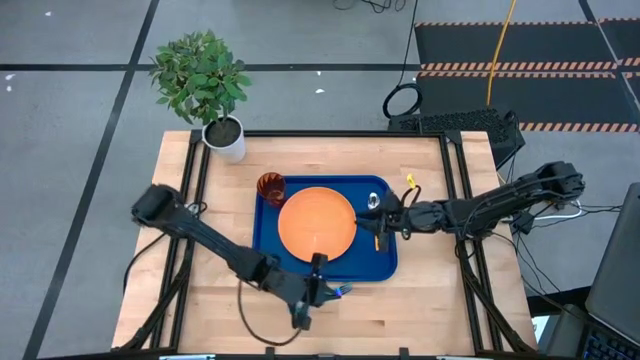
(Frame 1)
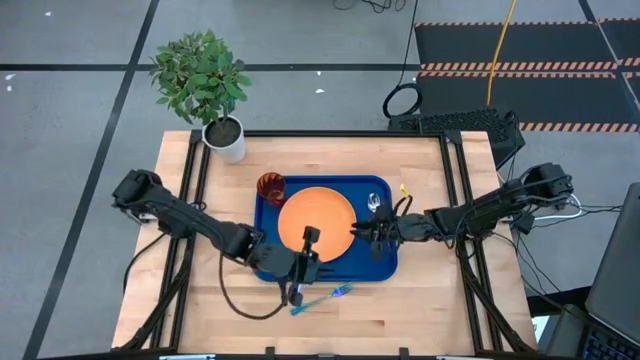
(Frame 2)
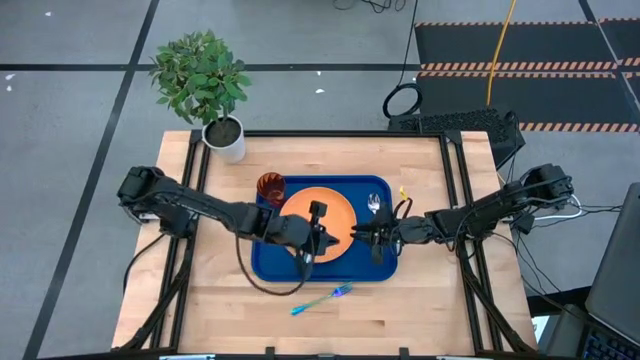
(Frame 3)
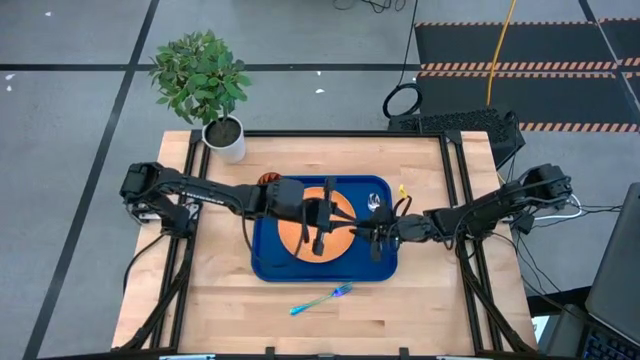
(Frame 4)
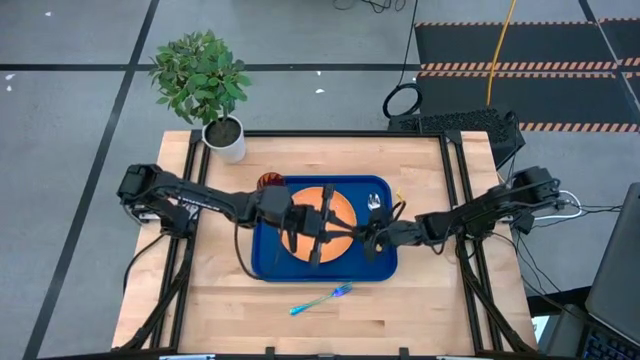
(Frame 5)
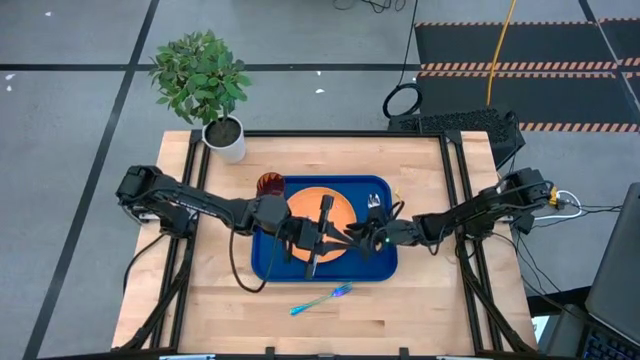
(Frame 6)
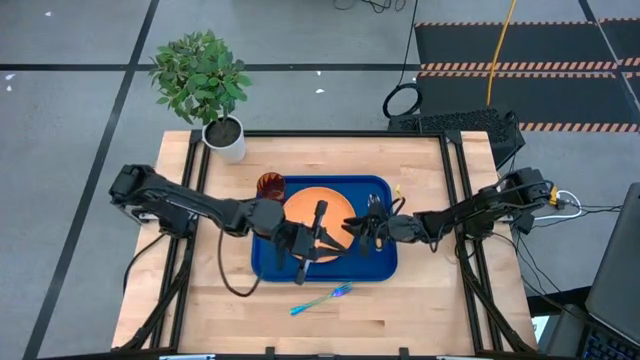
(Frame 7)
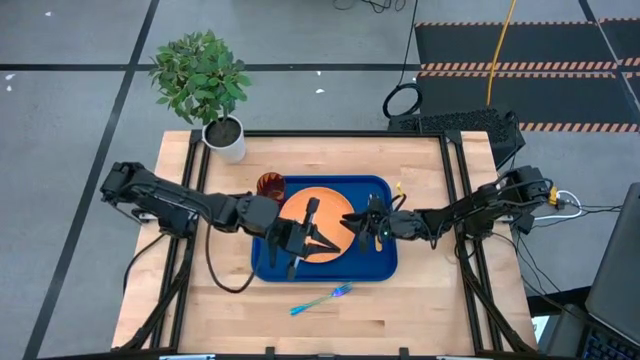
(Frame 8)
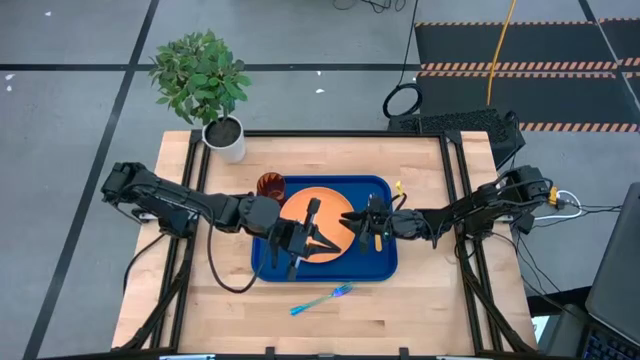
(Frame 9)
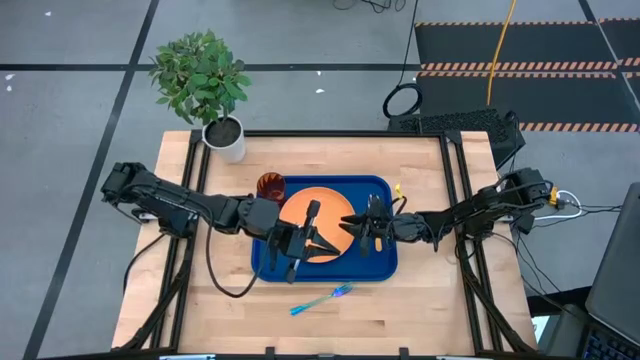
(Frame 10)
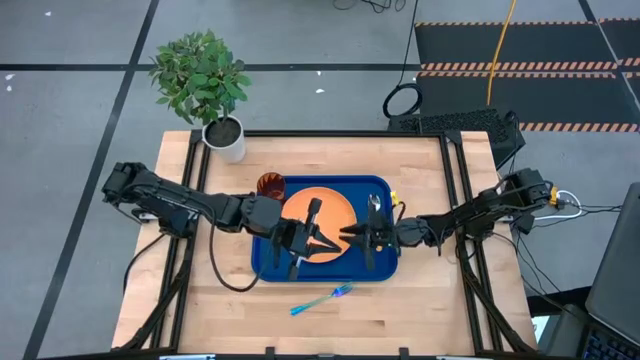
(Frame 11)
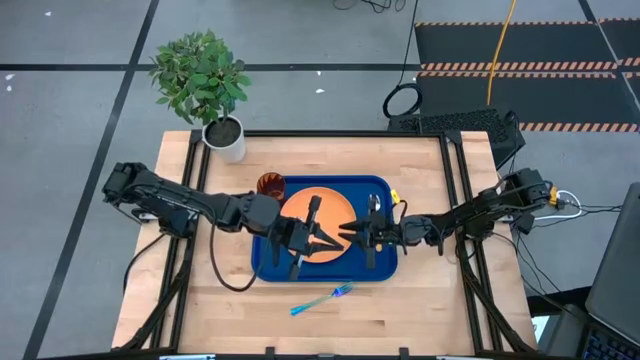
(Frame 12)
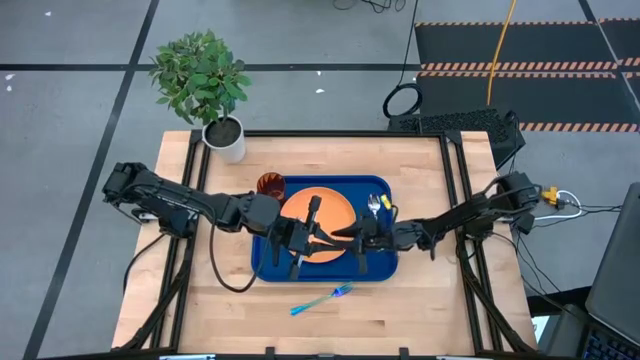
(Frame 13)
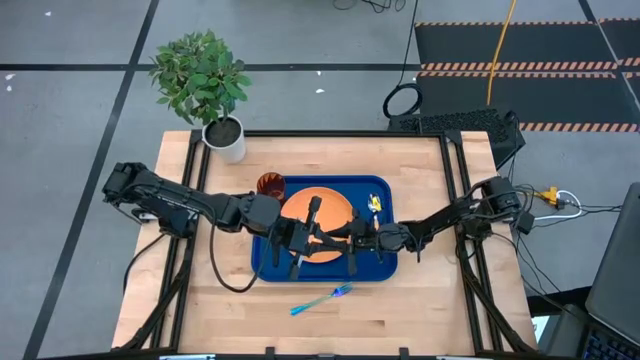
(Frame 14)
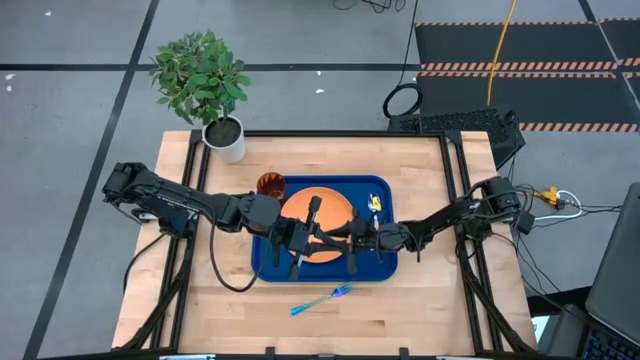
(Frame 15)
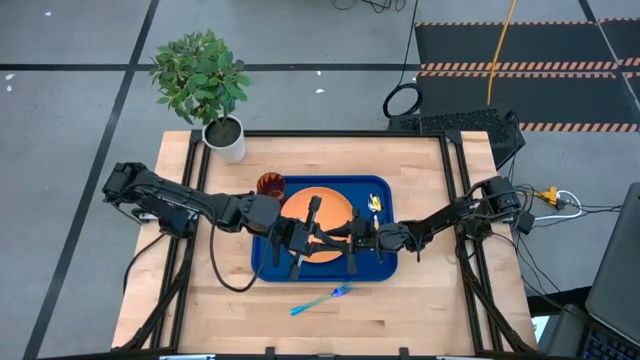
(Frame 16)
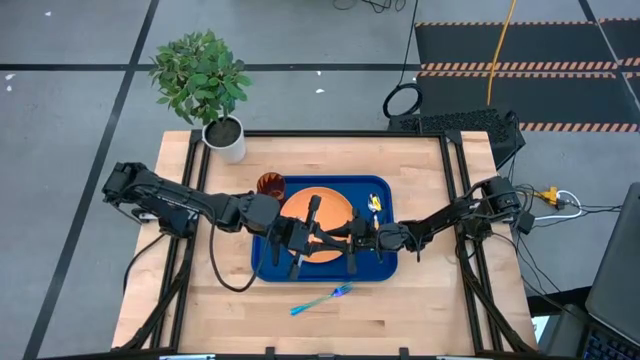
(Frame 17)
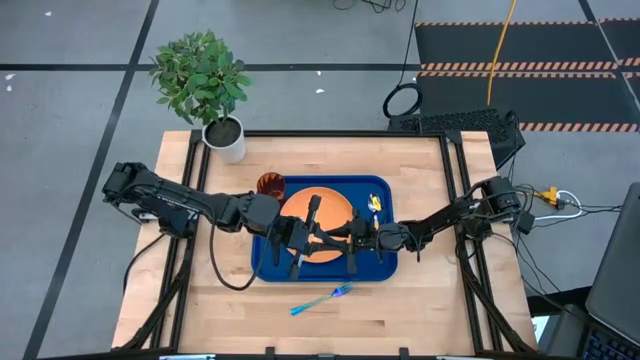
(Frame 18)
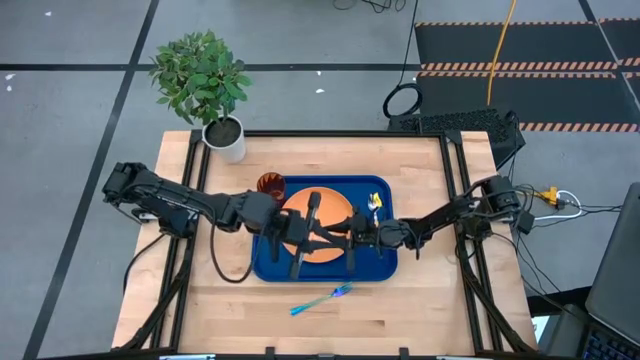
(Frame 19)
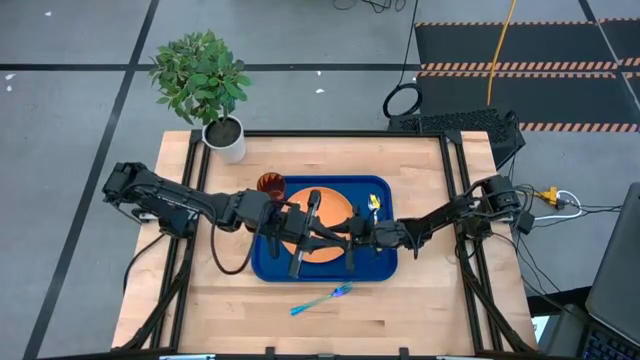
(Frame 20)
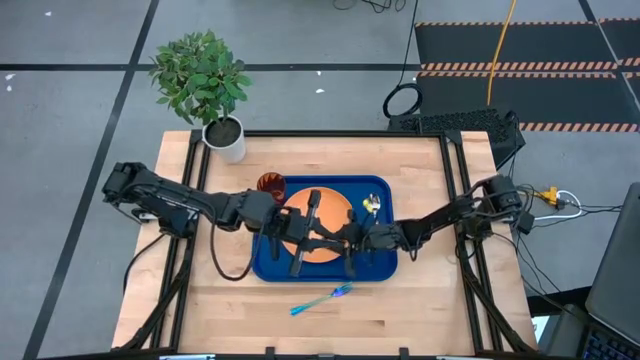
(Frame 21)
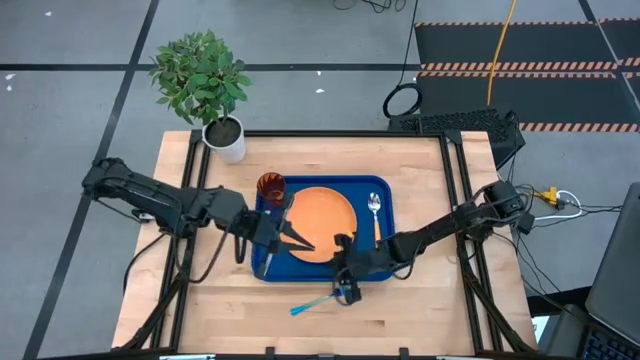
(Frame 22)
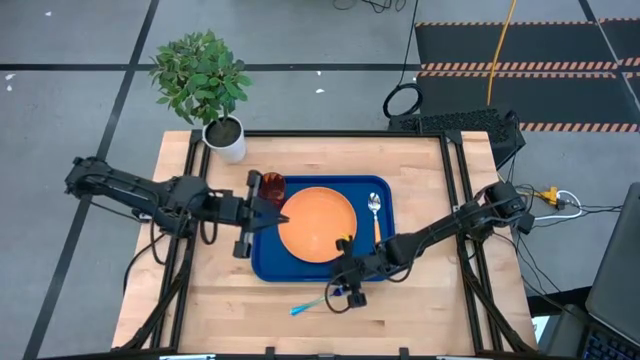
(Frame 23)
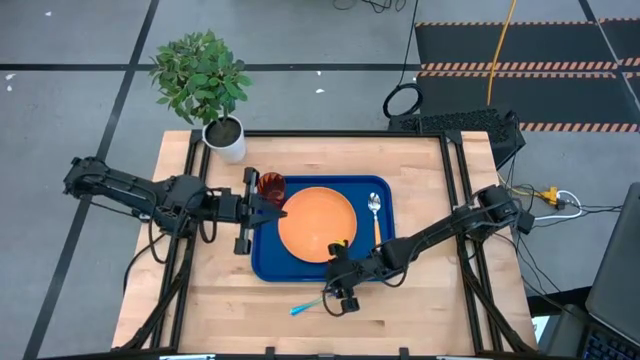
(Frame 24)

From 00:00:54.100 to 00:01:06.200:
Task: Pick and place plate/cup/fork/spoon on tray
Put the fork on the serving tray to the right of the plate

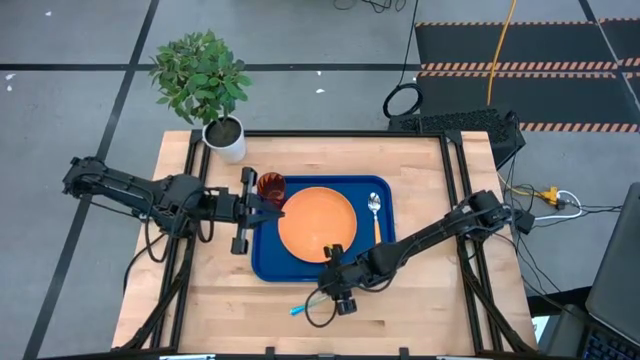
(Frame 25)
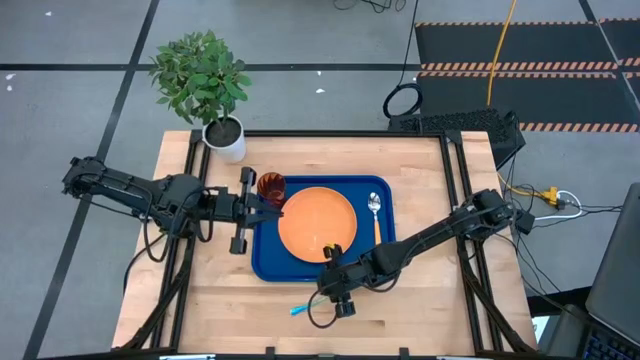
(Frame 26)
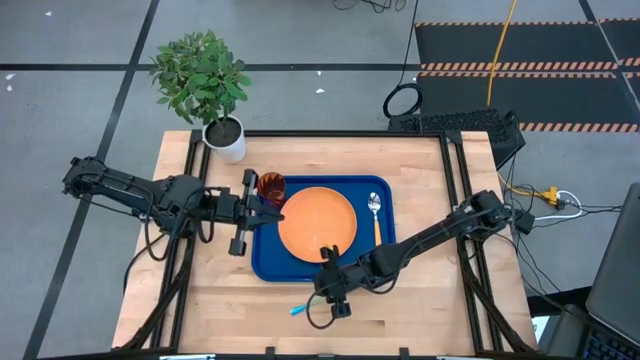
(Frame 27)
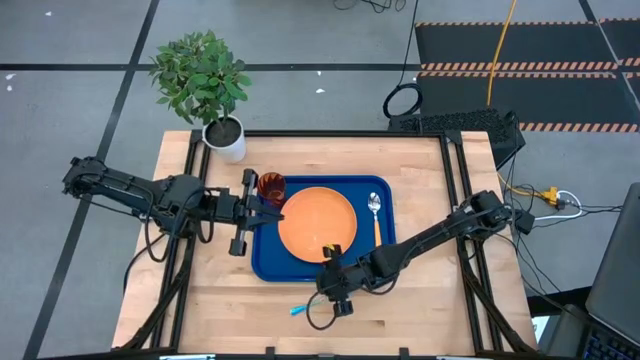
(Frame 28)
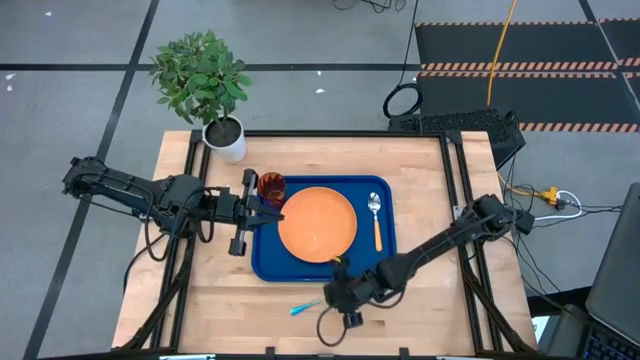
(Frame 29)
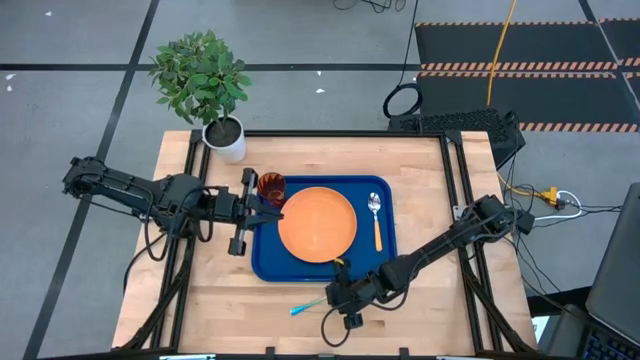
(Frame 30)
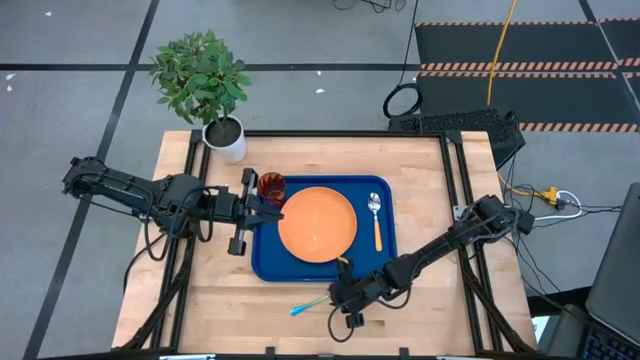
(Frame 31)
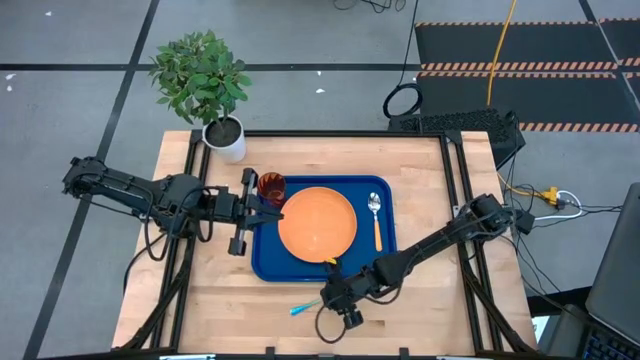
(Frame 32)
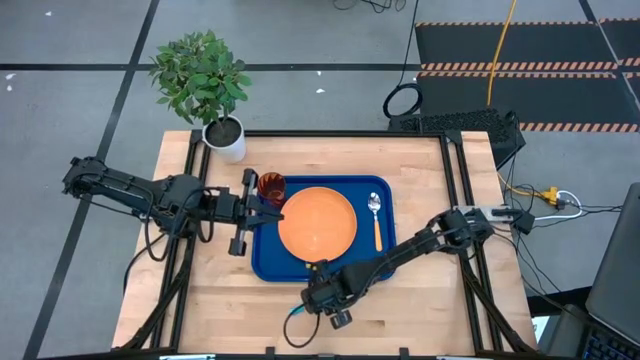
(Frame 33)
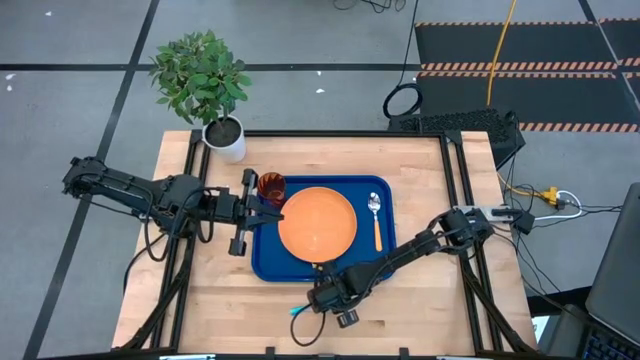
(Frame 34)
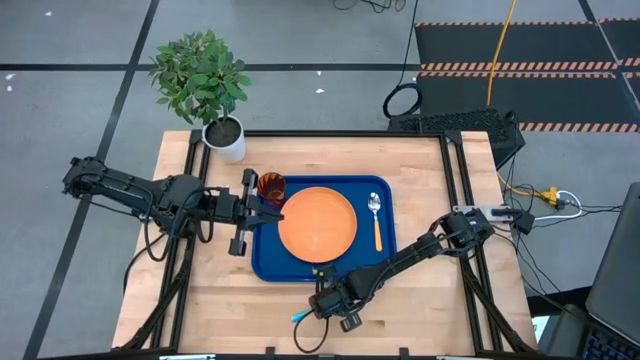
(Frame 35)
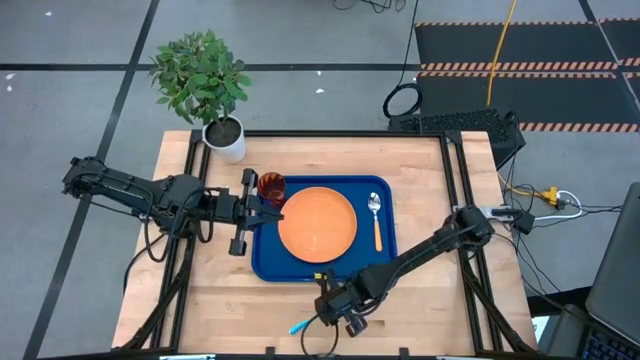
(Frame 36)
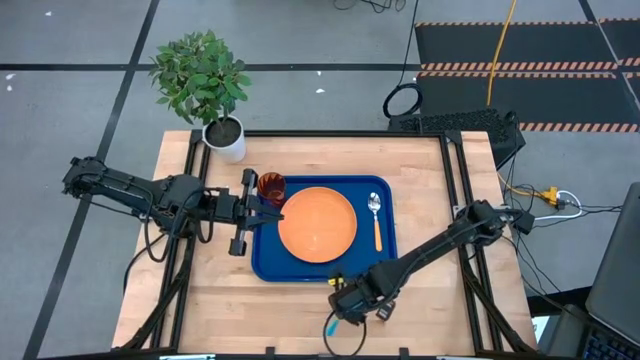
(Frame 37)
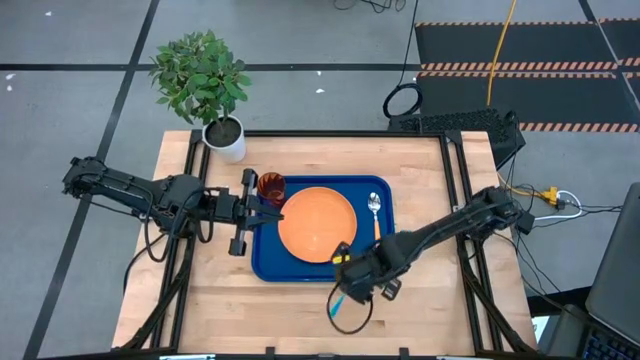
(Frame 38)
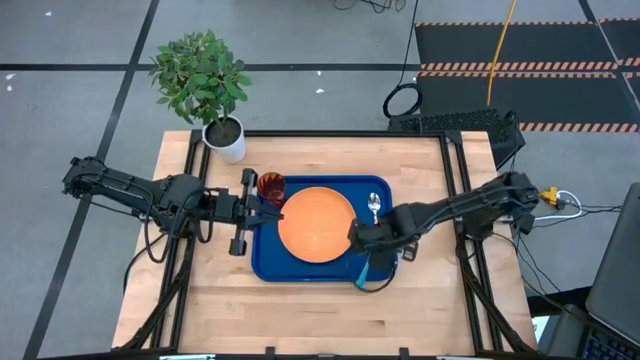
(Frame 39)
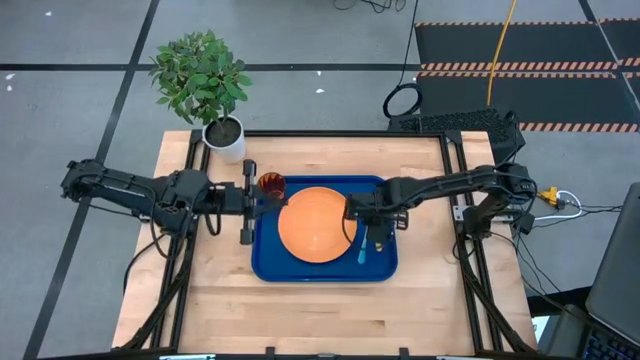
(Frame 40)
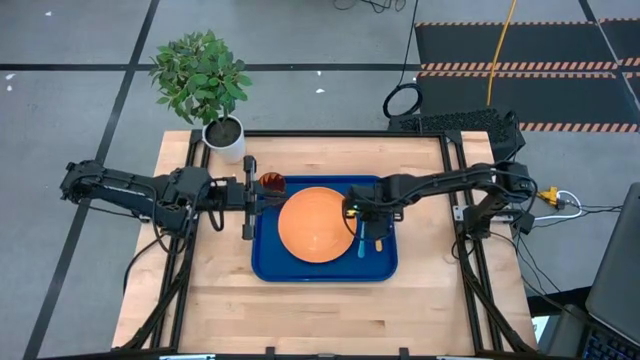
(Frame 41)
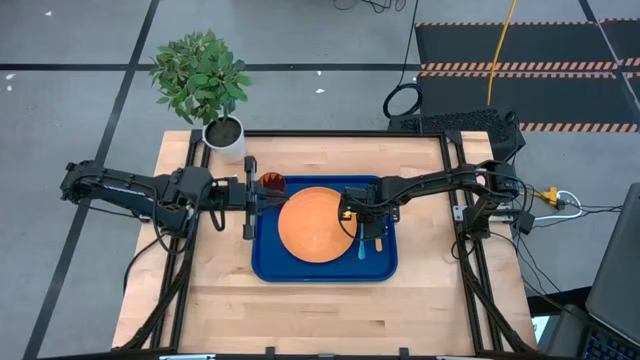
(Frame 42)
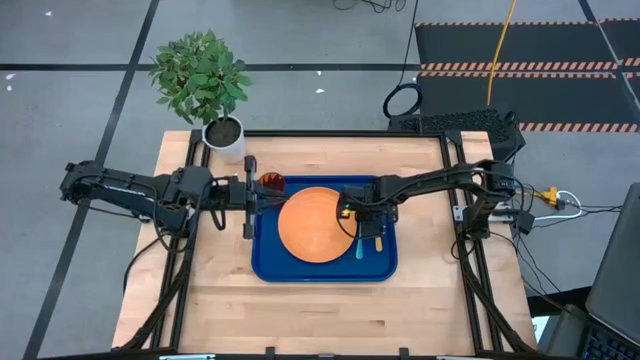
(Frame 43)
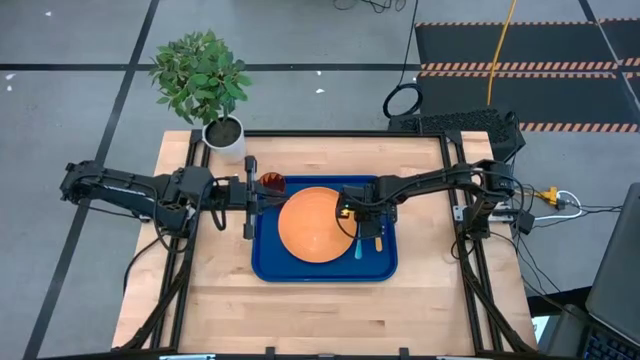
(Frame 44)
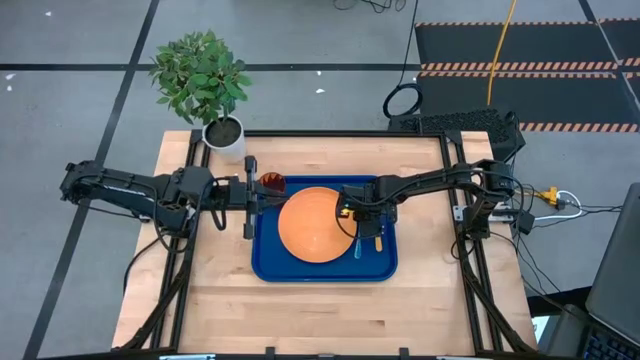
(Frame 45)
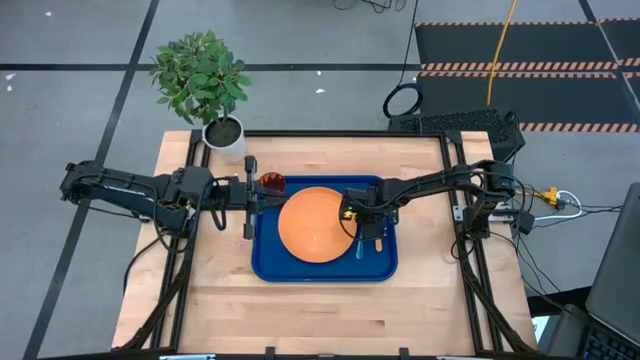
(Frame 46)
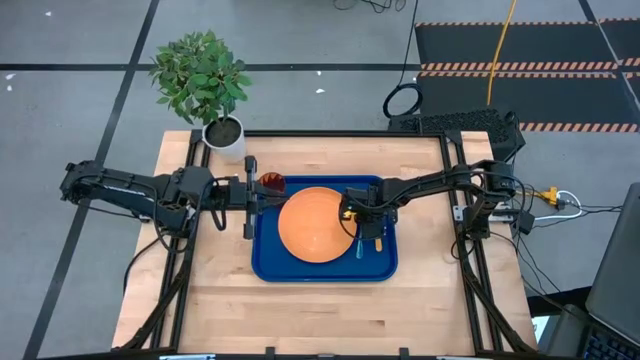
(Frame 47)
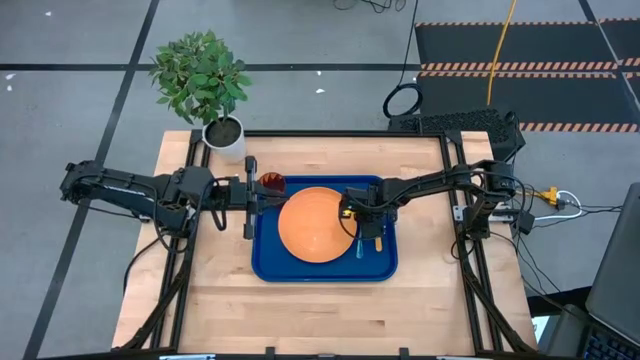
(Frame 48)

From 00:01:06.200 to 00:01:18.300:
Put the fork on the serving tray to the right of the plate
